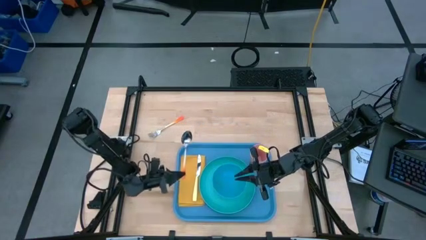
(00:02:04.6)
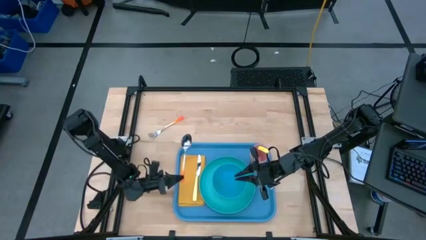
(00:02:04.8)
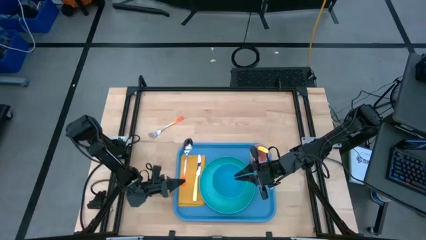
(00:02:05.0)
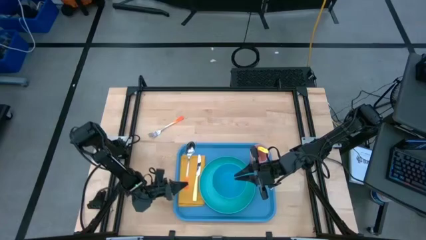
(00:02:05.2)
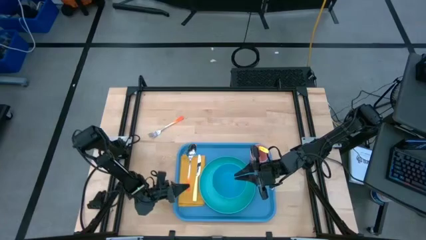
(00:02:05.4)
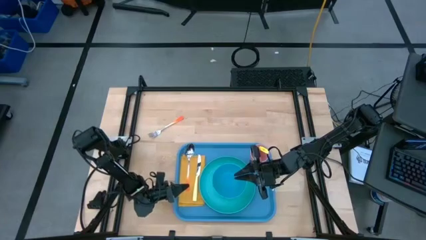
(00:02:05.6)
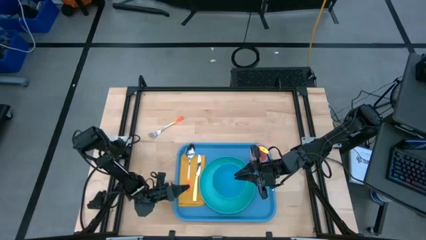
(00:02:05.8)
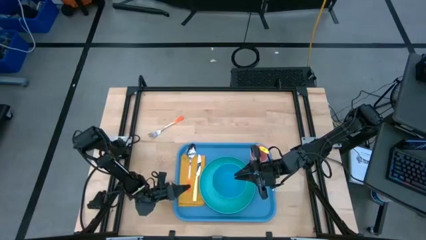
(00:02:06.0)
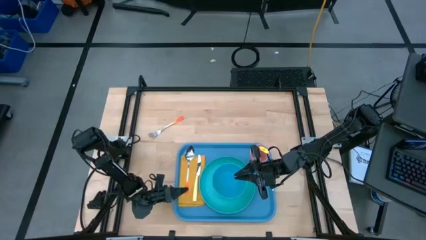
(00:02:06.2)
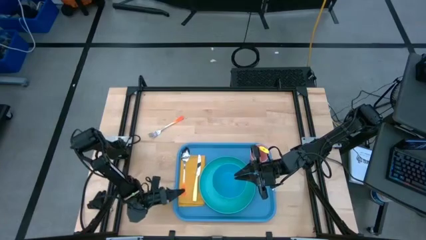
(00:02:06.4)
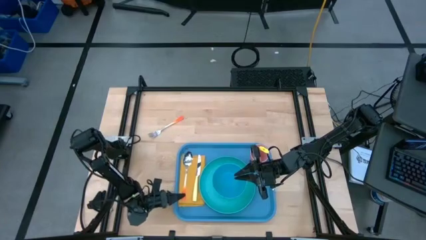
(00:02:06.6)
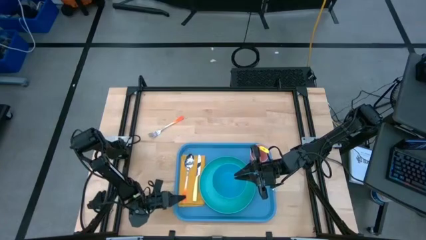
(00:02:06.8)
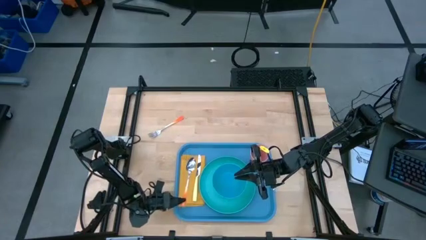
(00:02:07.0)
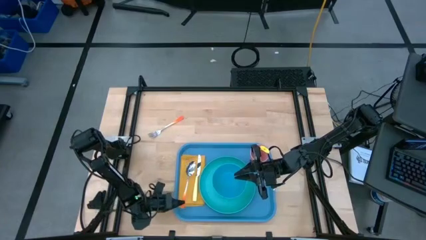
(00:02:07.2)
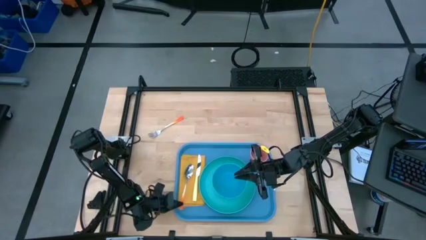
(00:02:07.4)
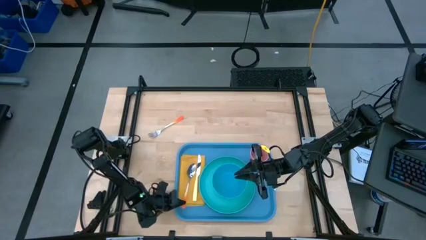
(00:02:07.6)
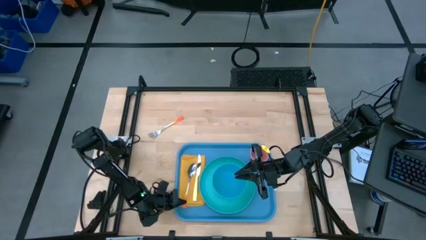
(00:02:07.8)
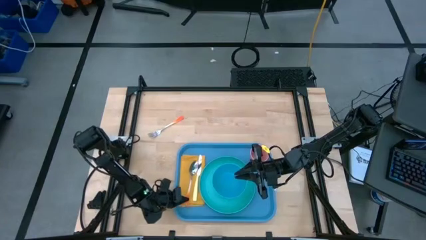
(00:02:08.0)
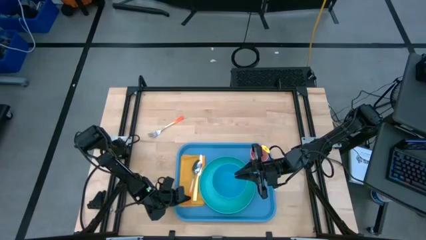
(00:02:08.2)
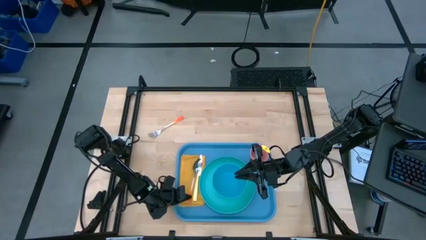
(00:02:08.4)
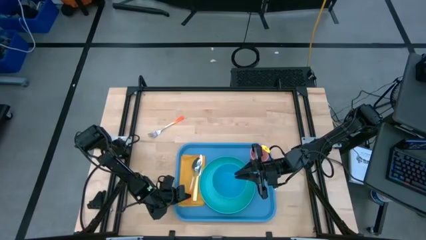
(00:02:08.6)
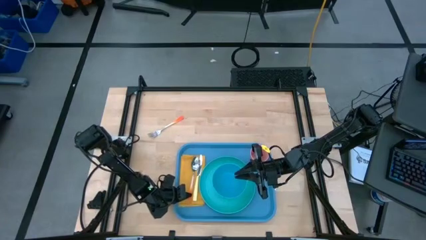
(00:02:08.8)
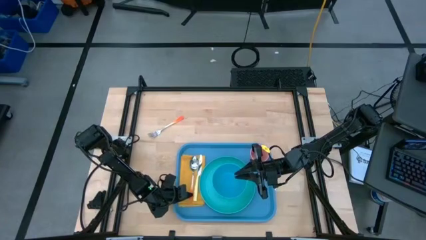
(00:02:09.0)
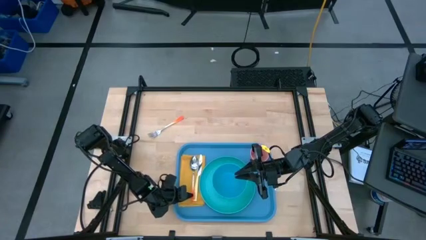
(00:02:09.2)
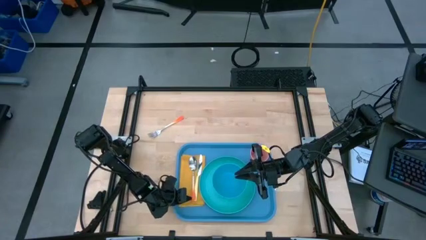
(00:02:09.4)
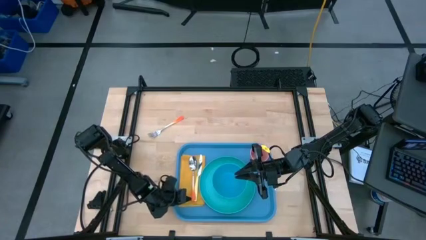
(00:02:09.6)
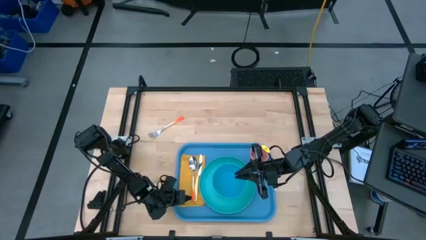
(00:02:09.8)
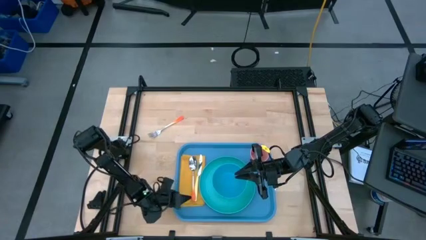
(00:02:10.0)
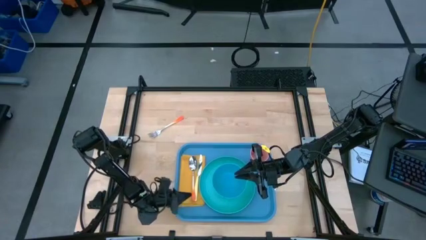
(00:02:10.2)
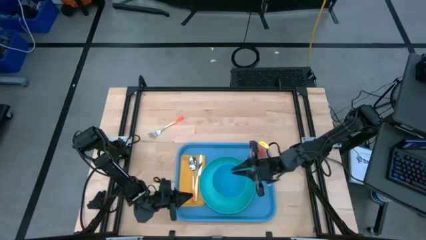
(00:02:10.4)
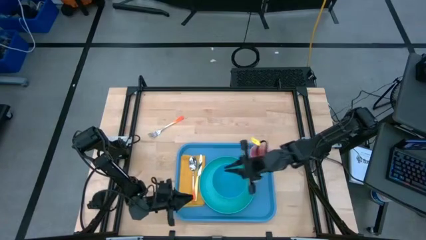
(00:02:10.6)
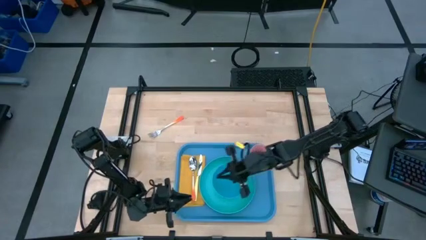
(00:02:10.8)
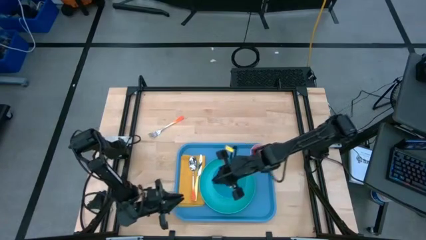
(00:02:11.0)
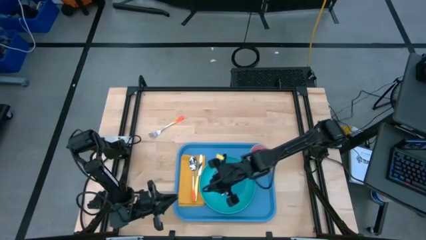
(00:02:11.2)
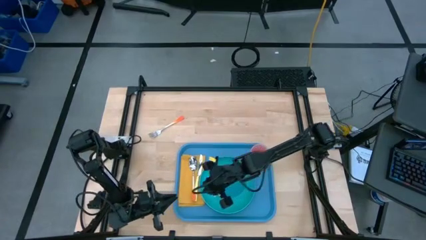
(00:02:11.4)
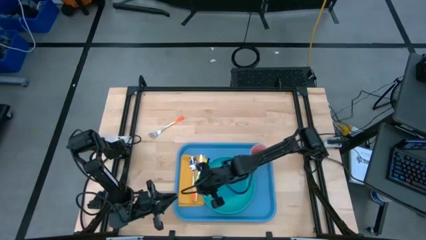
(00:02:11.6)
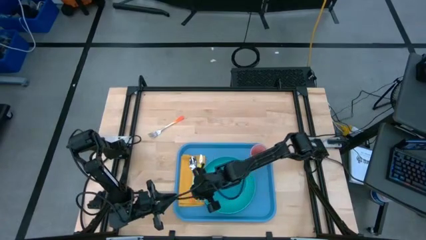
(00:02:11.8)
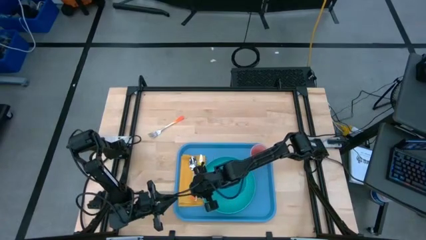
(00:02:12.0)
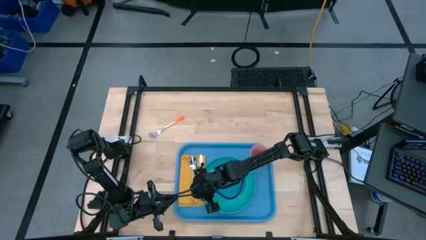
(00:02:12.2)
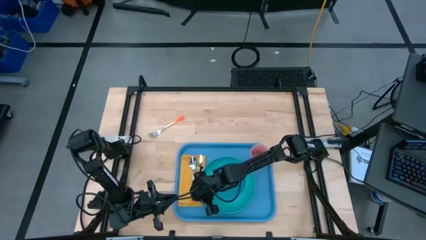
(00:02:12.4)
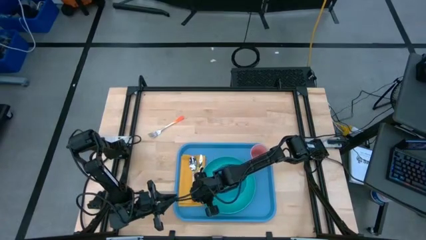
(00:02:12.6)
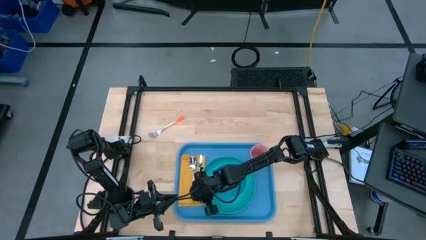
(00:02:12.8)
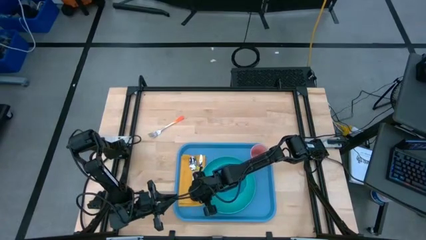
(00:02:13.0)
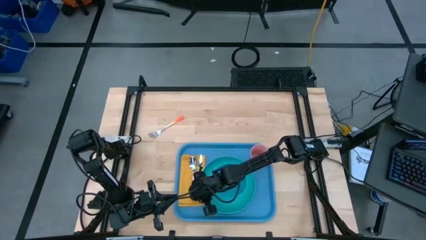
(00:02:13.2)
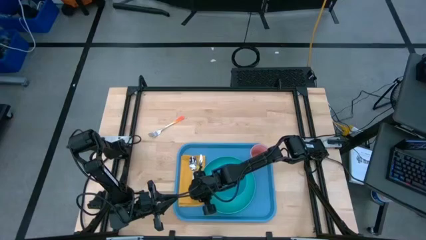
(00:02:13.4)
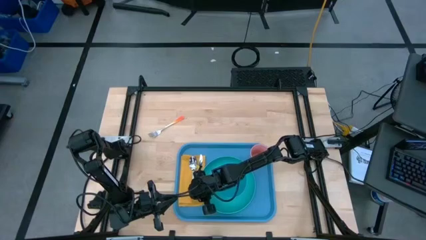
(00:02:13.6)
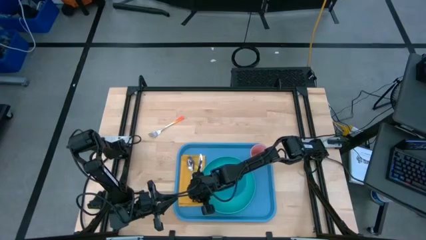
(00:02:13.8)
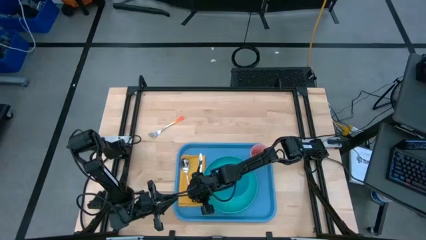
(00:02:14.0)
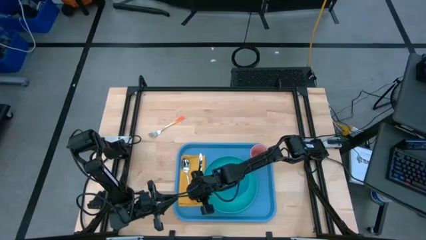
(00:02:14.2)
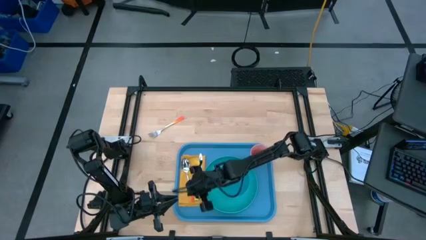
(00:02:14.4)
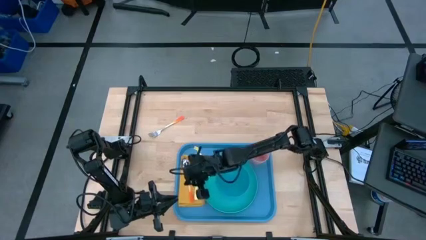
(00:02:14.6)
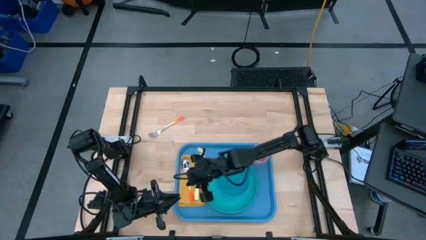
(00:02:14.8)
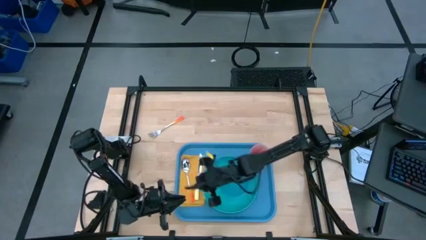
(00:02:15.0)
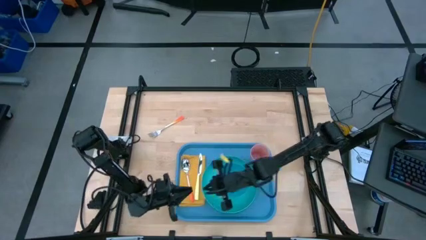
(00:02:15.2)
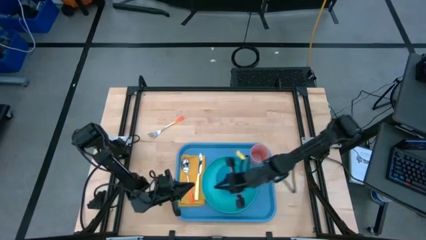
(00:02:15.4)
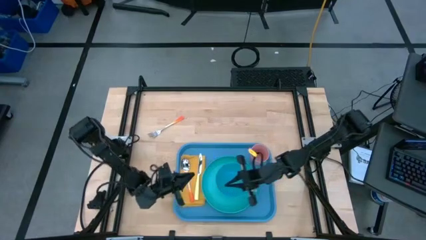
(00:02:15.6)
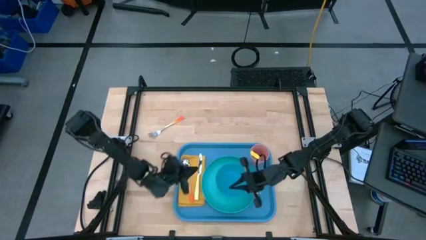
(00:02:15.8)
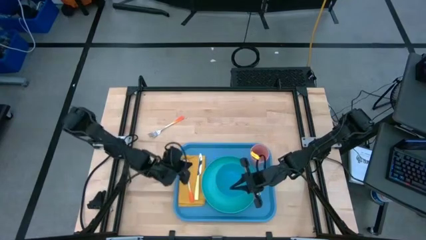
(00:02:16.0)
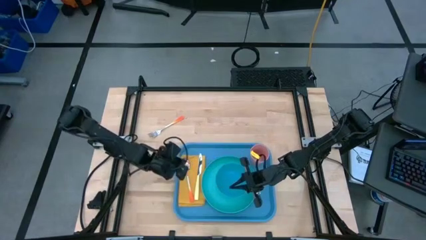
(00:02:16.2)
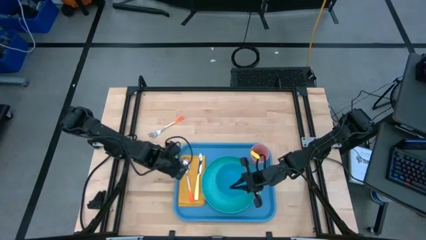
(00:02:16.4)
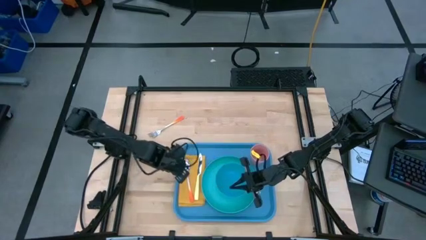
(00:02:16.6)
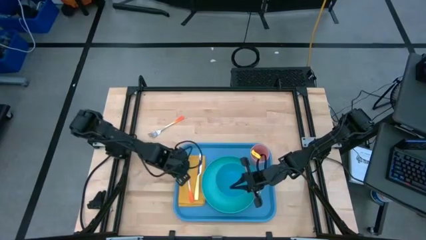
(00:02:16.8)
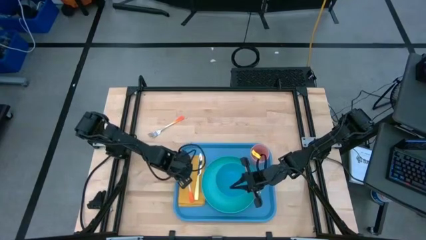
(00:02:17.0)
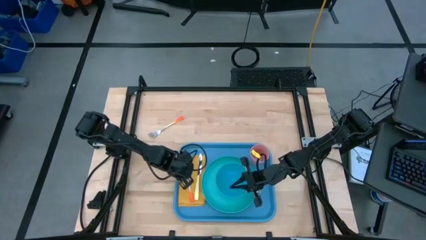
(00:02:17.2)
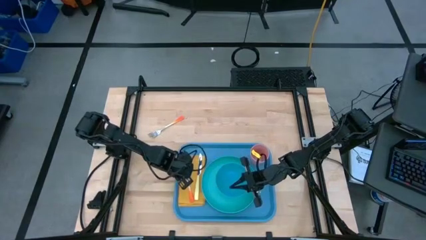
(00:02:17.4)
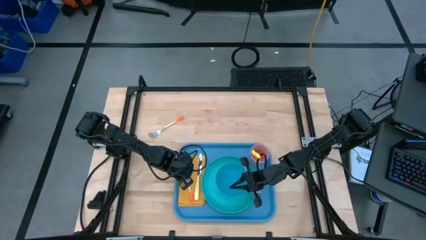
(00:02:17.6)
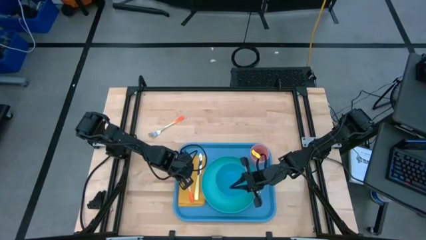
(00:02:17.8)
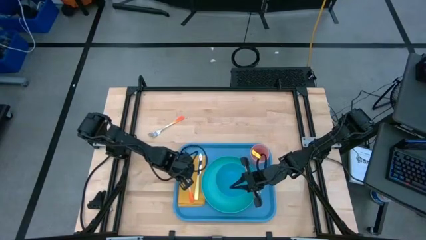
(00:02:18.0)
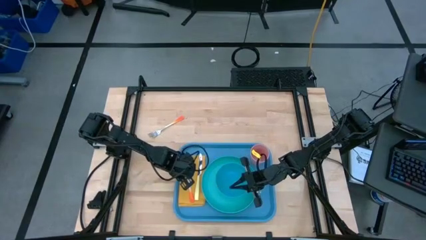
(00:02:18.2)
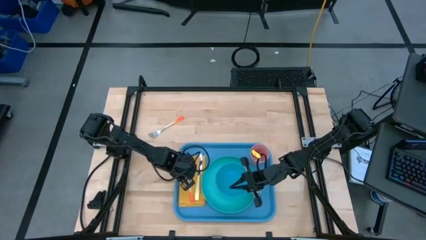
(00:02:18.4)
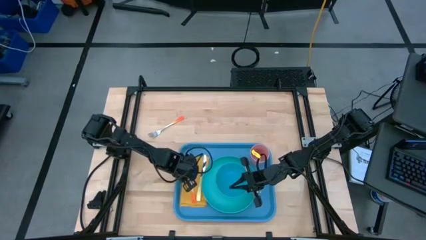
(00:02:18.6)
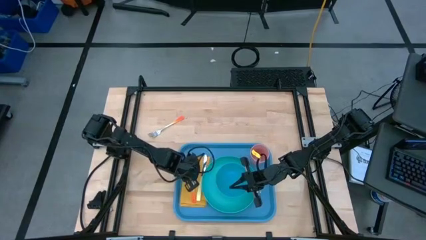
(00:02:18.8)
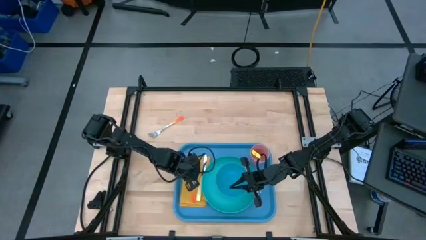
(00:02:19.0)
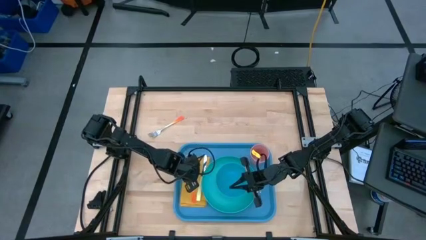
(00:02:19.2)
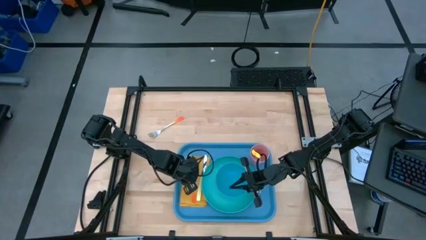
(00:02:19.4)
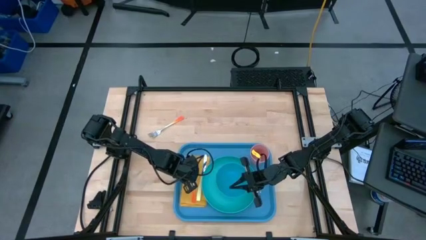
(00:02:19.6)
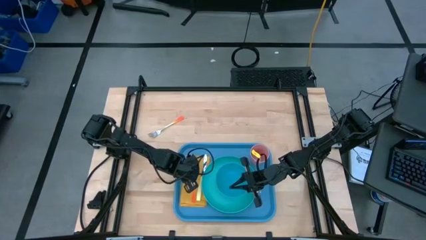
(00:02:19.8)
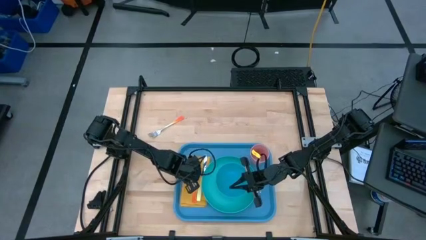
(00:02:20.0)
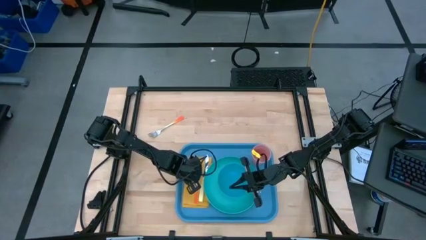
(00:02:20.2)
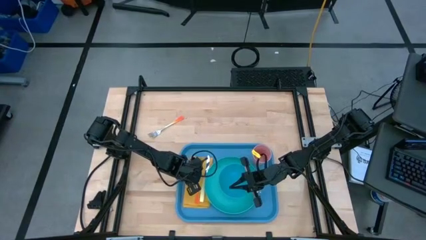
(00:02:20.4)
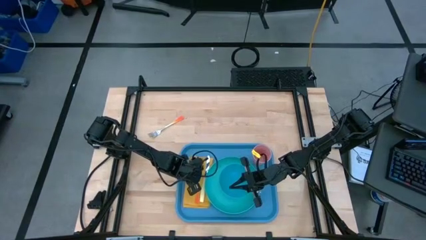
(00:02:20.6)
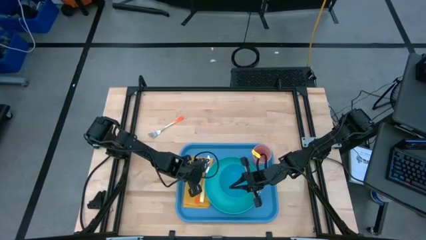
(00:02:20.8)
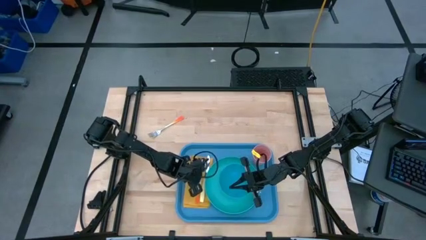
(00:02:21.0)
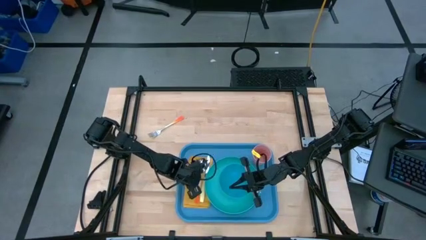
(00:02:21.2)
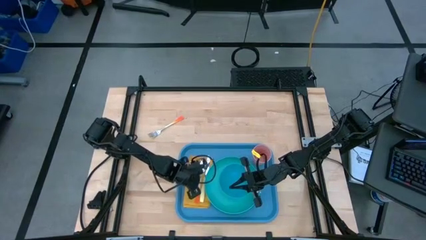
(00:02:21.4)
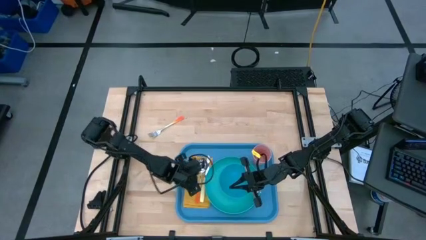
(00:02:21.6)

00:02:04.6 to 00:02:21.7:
Task: Set up tray
Put the orange spoon on top of the yellow napkin to the left of the yellow knife
